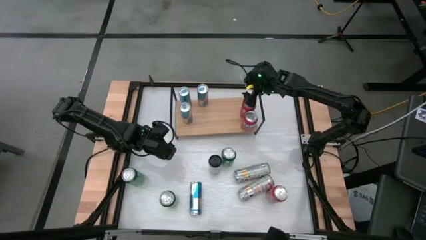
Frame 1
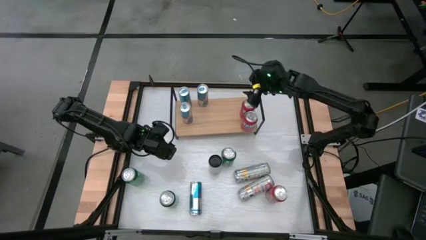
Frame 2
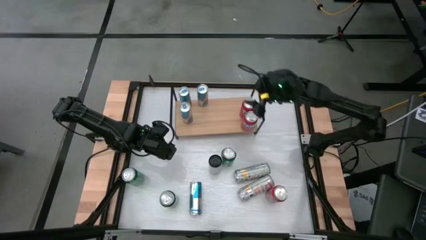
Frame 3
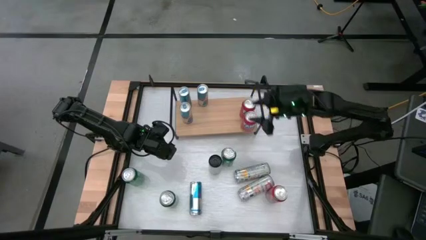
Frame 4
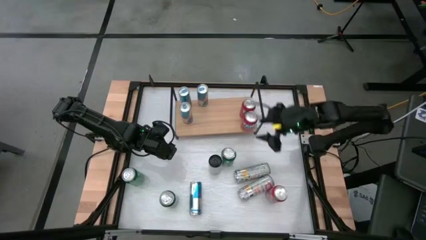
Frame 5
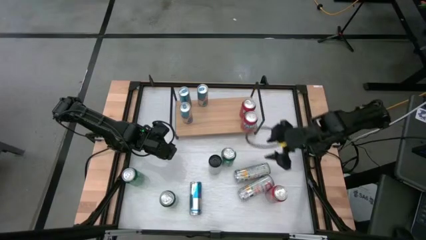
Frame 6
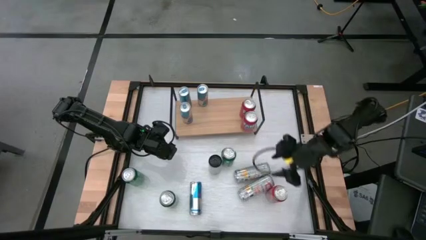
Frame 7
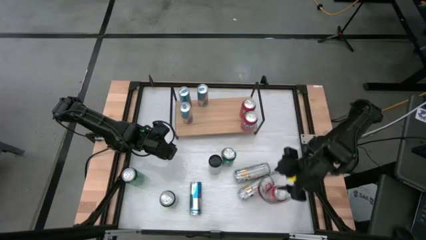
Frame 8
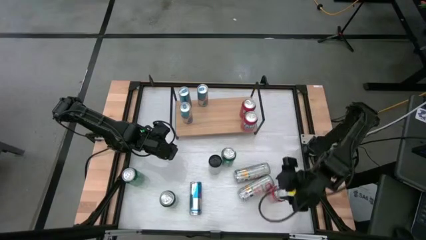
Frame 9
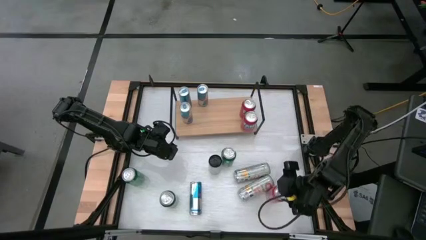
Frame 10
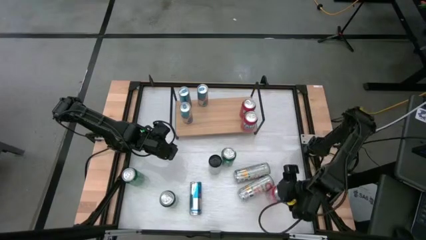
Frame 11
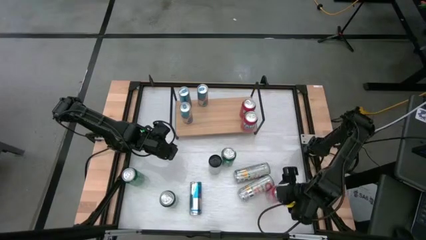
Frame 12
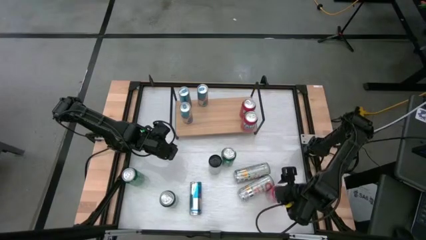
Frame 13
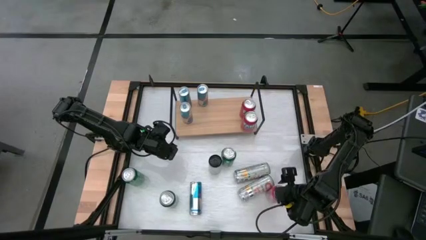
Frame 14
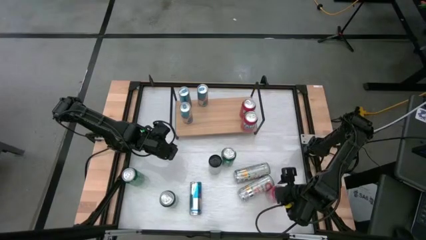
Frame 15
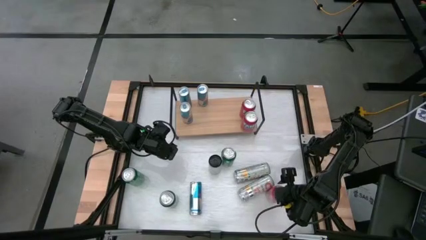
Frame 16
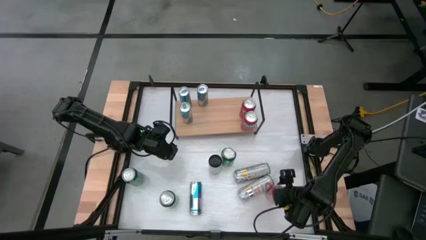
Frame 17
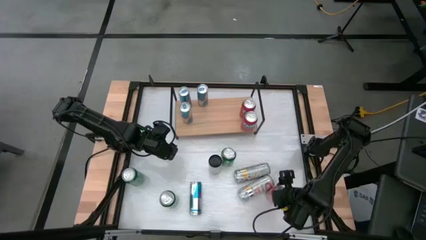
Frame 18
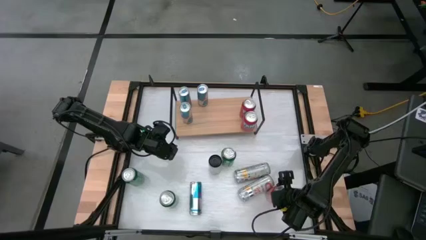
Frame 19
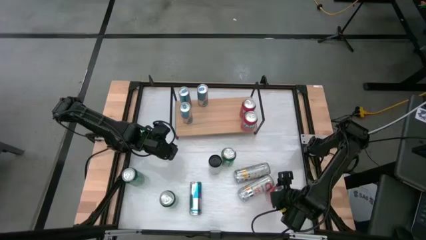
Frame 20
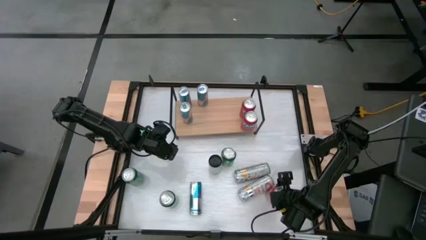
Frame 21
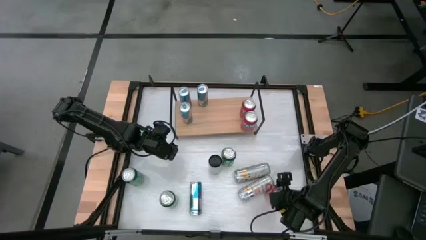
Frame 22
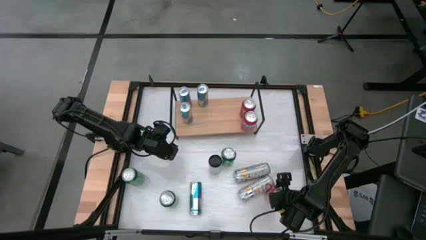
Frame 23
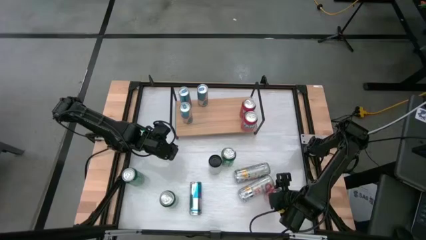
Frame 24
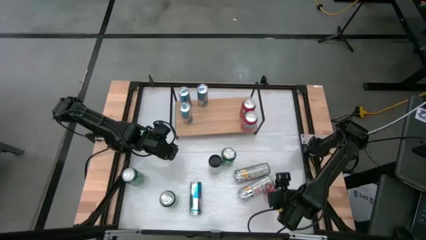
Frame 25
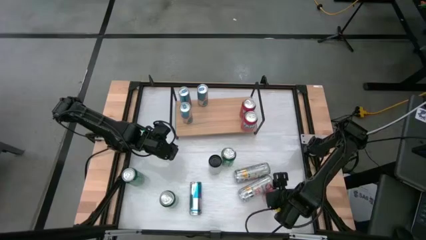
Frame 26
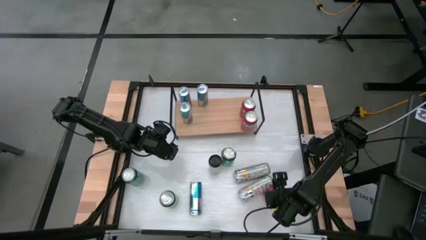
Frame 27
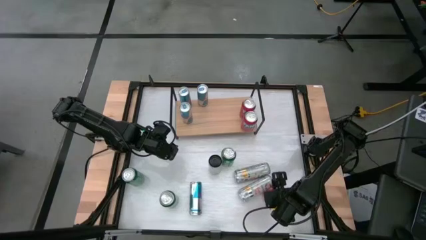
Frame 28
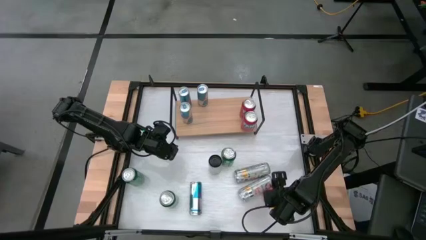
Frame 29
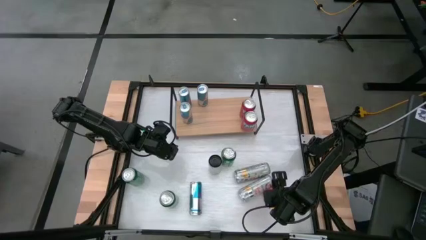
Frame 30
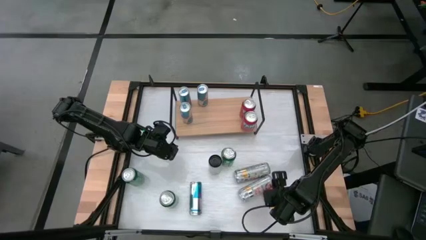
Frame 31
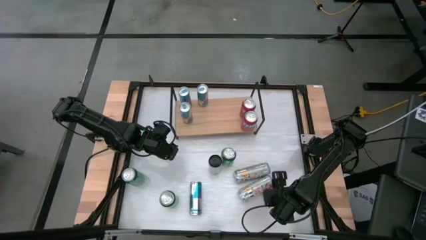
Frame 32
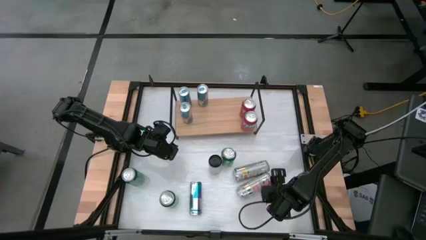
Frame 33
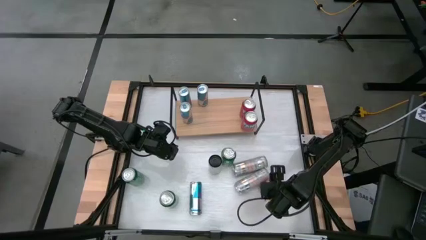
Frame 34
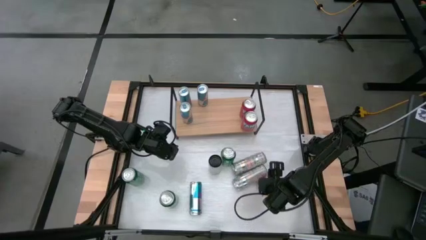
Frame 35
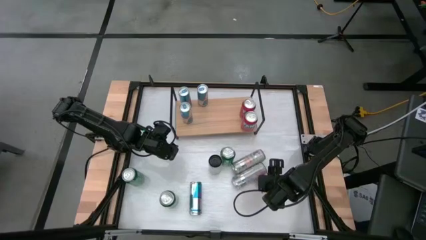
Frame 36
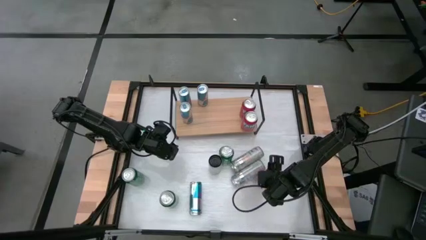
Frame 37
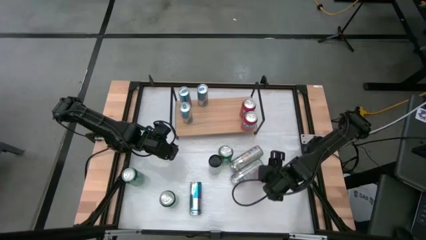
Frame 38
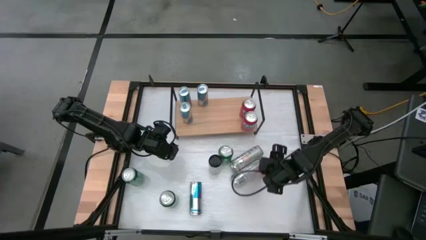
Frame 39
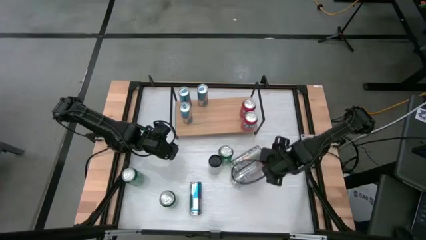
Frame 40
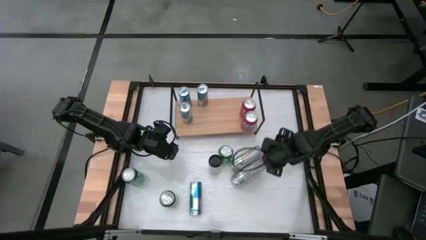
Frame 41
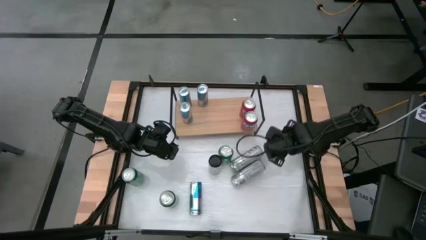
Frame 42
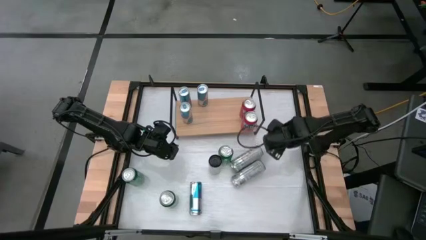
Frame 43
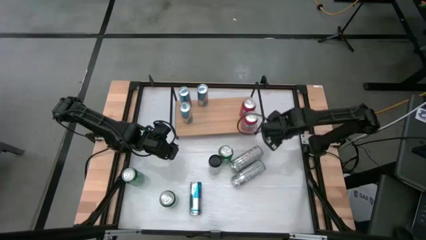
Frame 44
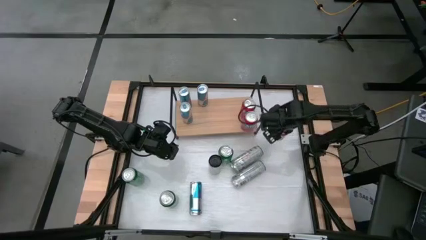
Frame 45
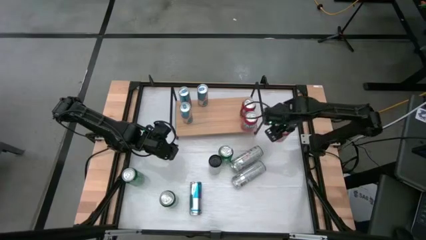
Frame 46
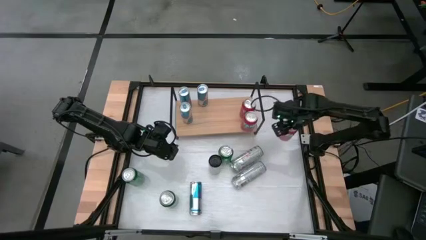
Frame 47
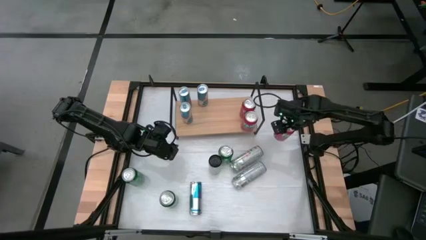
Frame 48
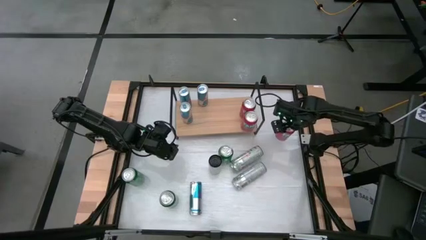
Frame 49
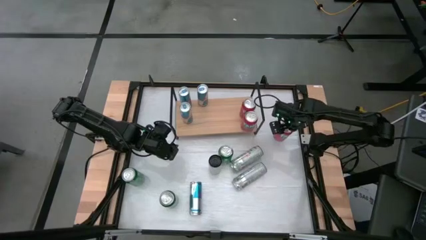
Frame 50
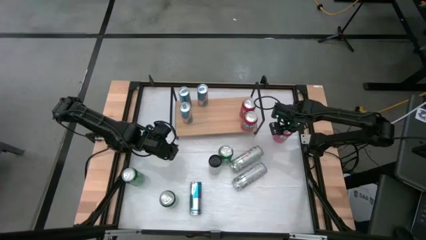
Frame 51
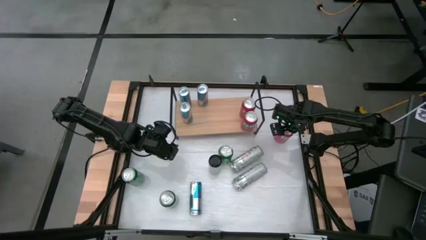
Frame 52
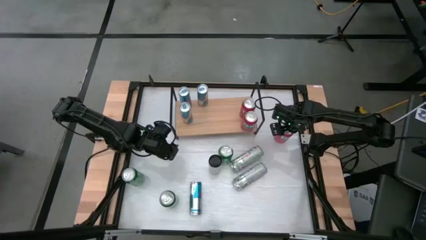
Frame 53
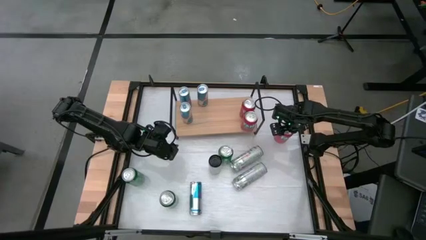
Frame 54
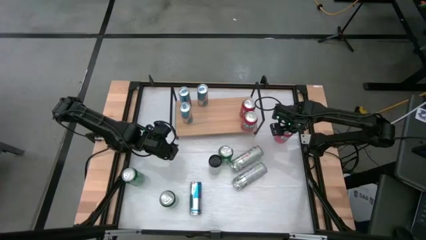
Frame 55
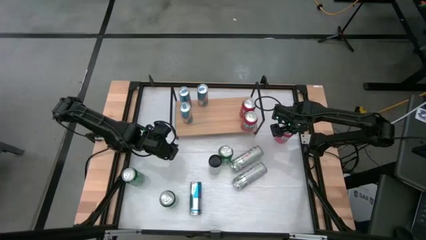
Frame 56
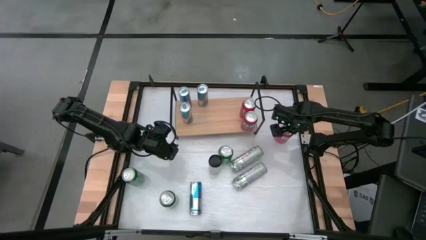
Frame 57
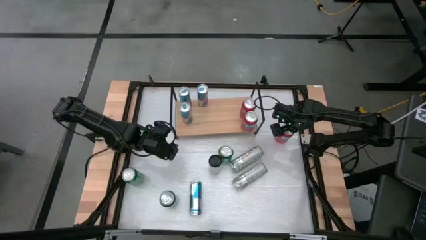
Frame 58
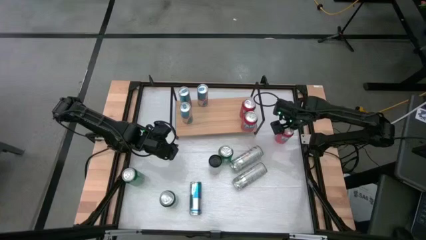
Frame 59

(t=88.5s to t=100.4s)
Task: Sort soda cans
Put the orange soda can on the shelf and align with the other orange soda cans
